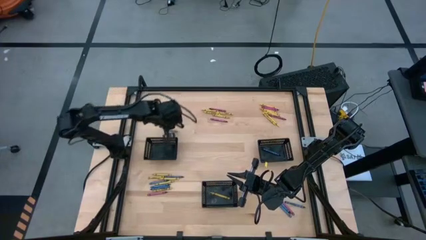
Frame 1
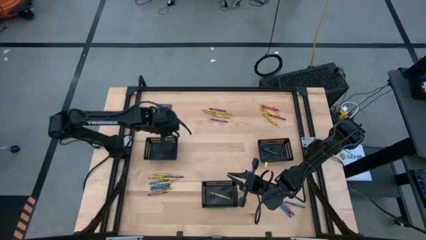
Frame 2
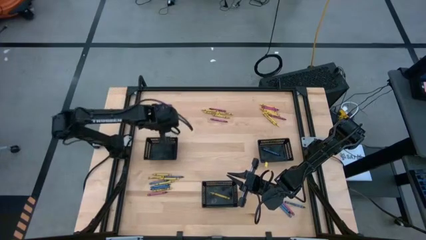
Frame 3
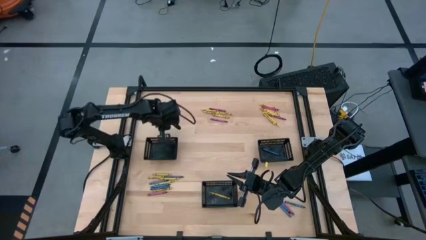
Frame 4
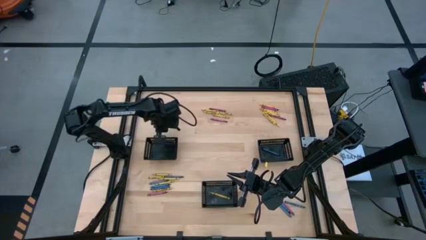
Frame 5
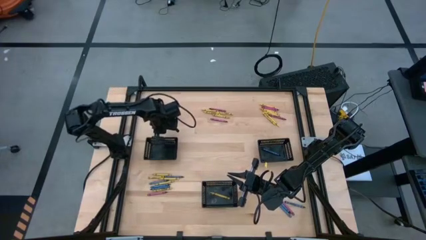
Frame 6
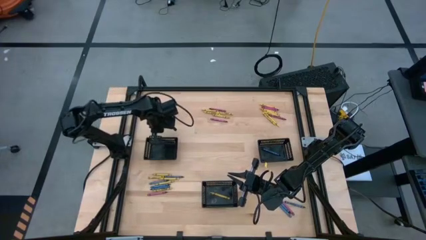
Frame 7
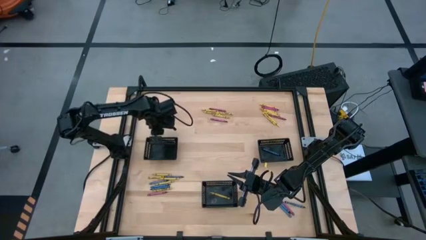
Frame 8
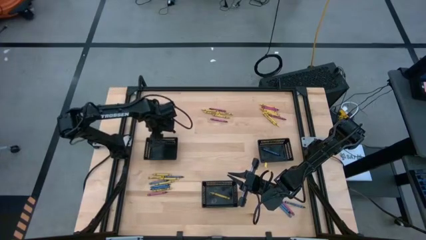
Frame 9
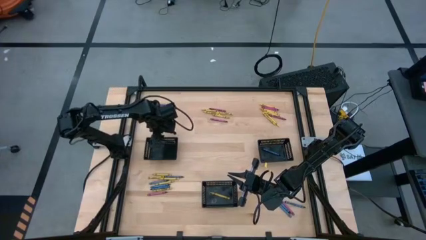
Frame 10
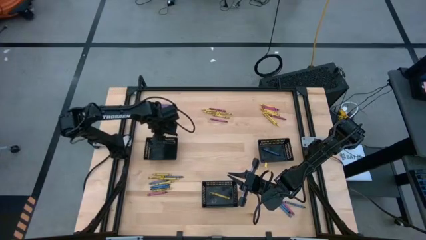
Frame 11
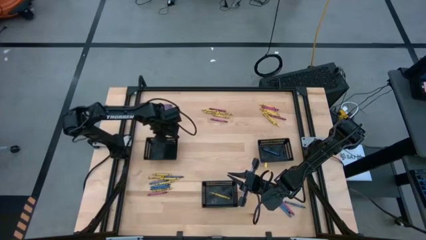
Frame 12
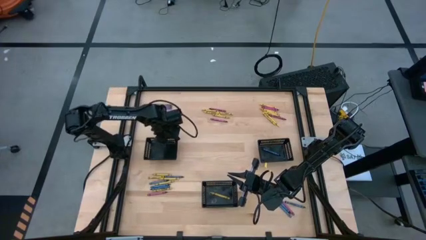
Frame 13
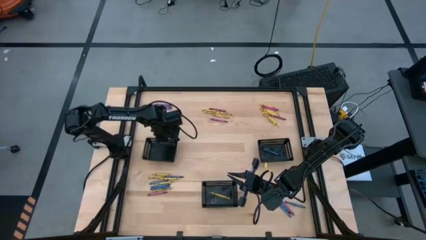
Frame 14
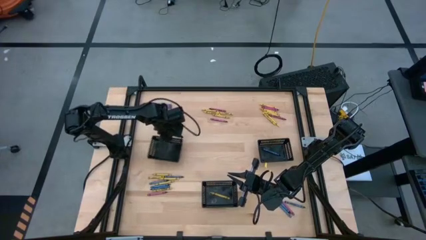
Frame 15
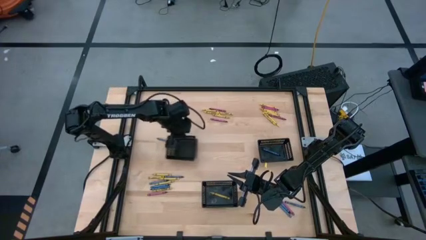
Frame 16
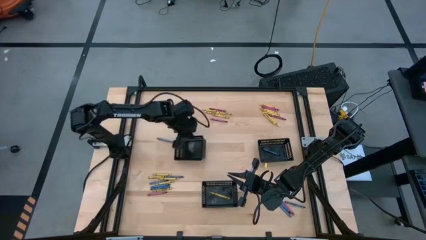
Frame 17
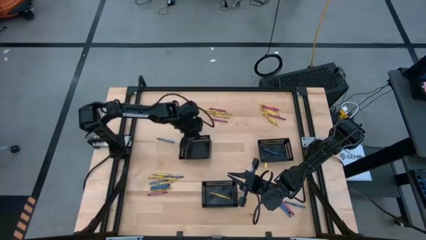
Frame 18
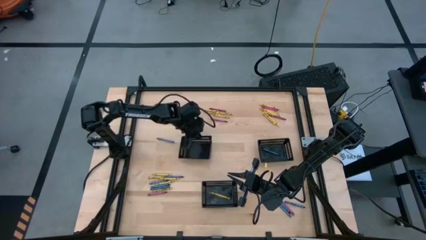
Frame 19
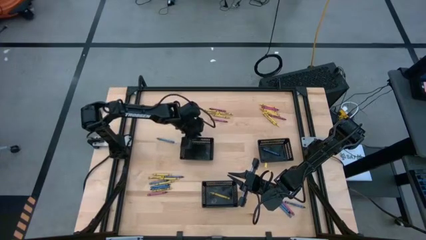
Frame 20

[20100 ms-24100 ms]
Task: Sort crayons
Adjust the left black bin

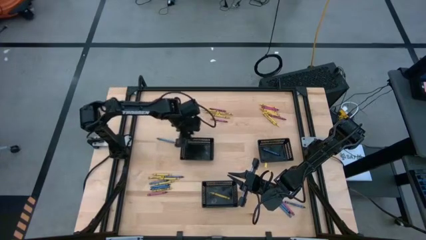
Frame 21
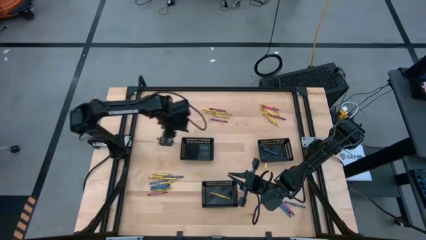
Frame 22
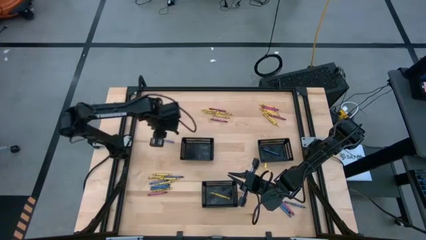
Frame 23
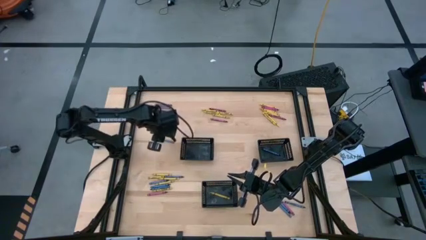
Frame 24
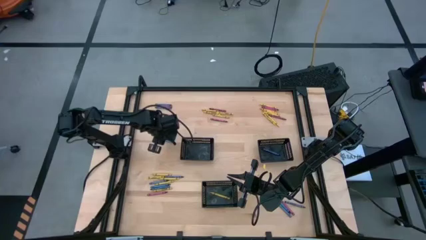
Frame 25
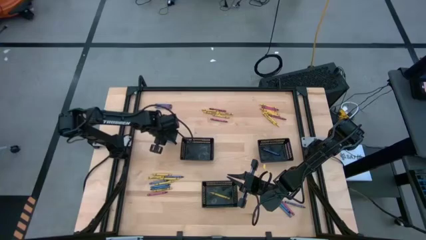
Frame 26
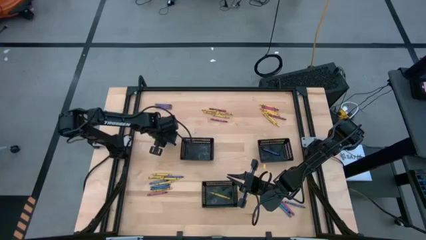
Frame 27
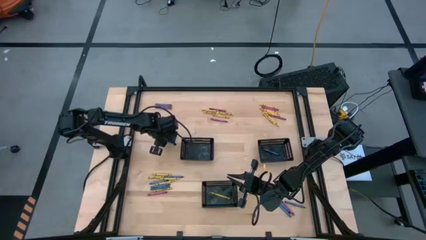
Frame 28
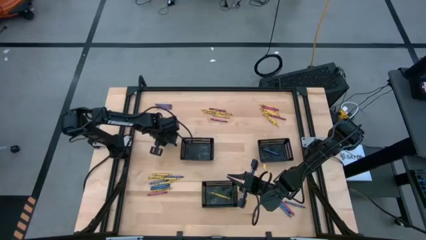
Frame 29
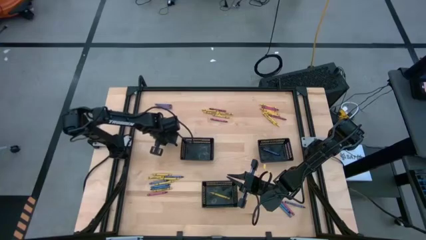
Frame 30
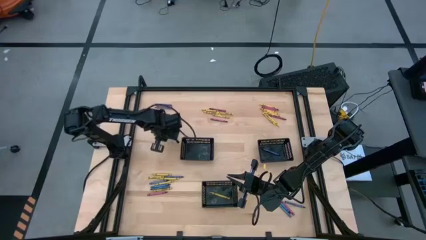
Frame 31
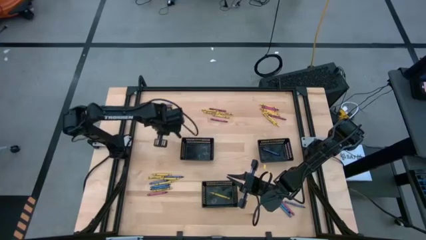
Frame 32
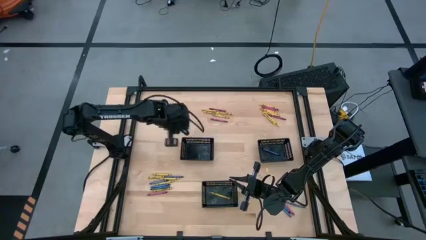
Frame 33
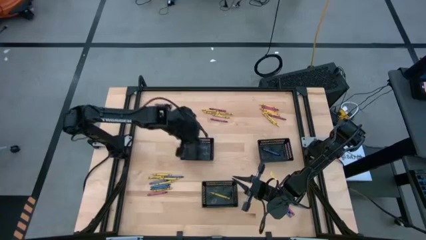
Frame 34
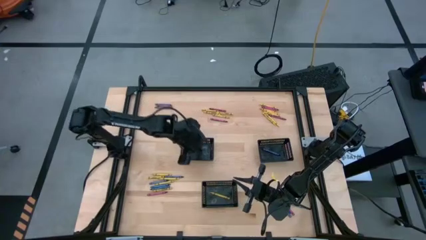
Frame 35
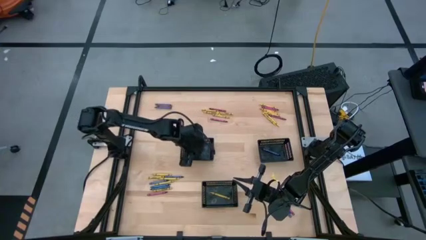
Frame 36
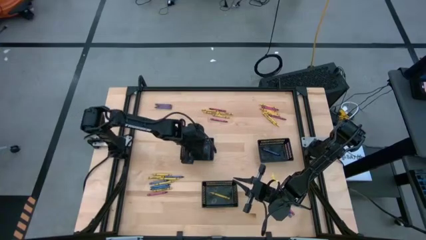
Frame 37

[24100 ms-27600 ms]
Put the blue crayon into the left black bin

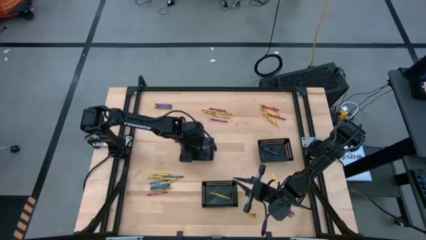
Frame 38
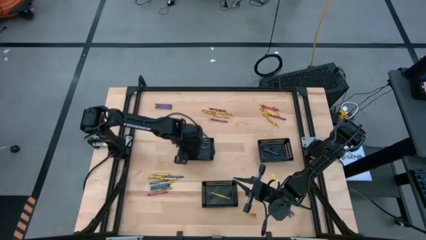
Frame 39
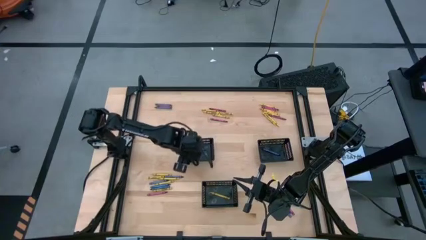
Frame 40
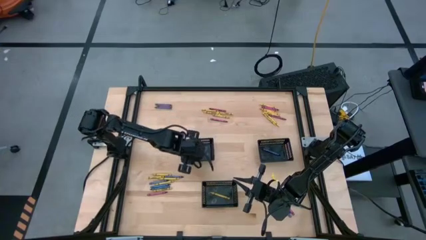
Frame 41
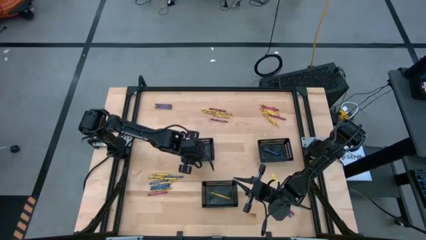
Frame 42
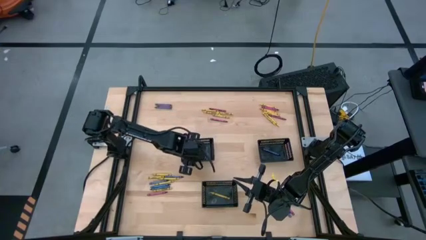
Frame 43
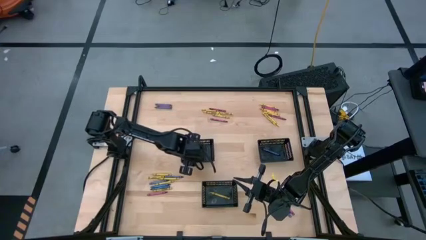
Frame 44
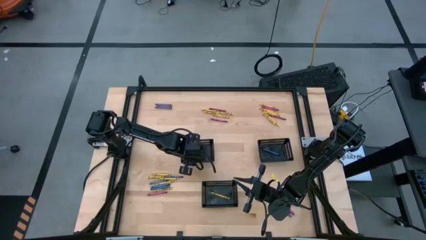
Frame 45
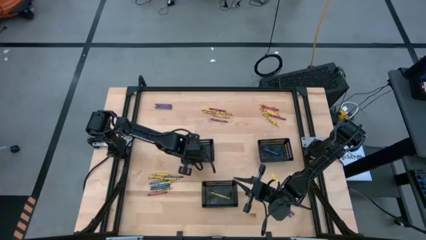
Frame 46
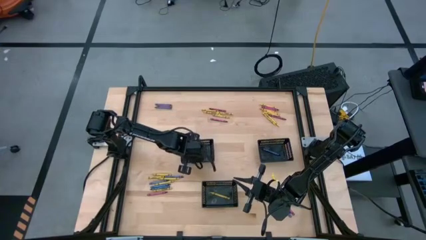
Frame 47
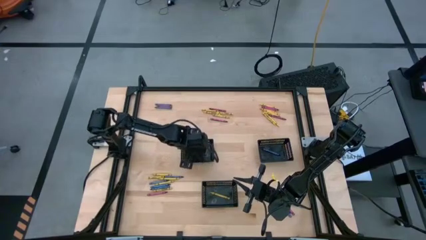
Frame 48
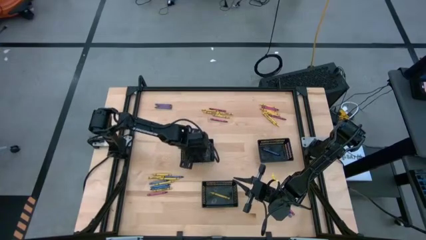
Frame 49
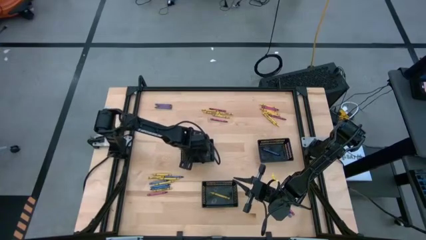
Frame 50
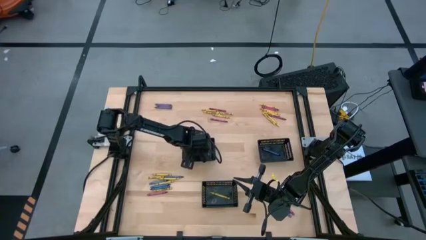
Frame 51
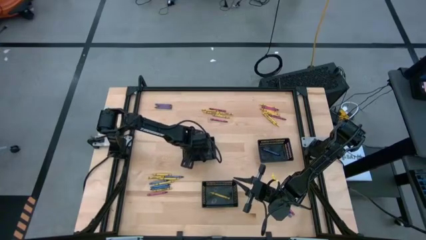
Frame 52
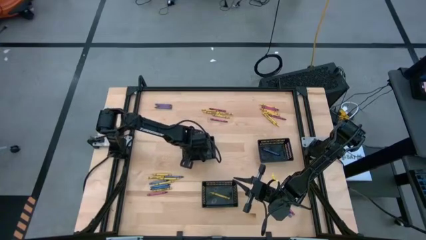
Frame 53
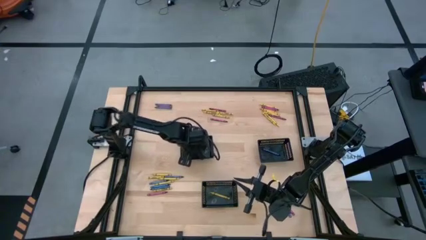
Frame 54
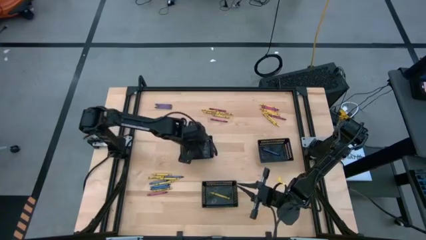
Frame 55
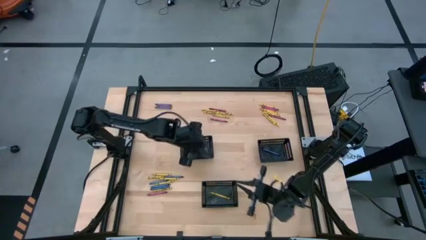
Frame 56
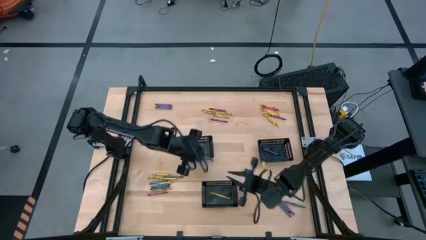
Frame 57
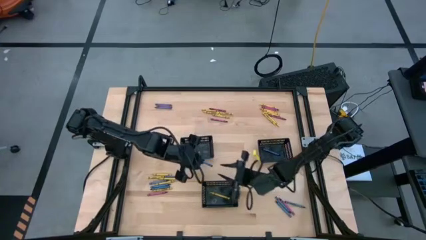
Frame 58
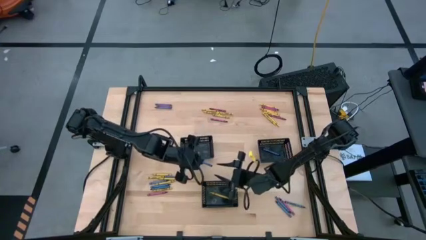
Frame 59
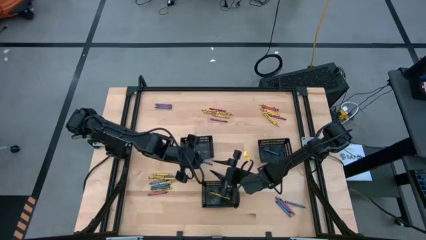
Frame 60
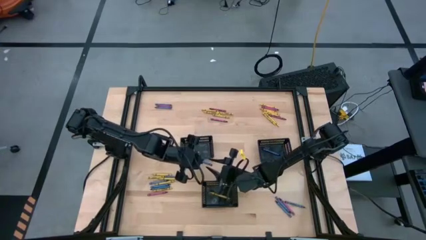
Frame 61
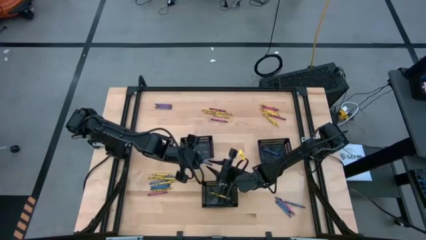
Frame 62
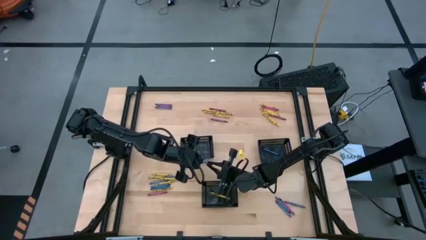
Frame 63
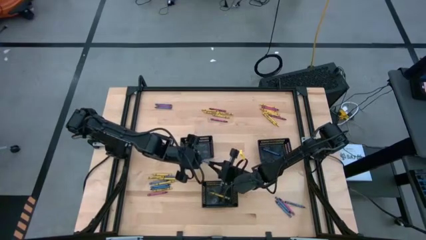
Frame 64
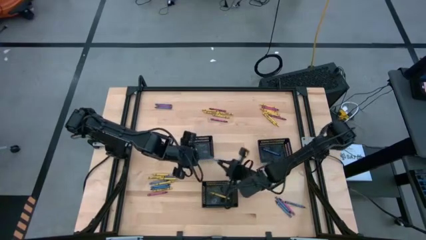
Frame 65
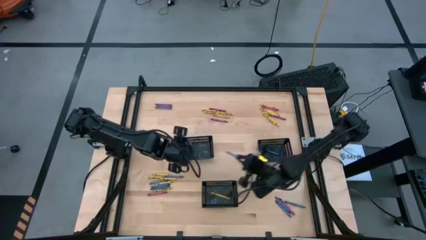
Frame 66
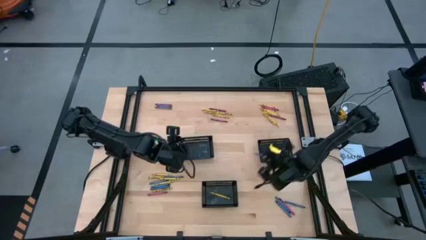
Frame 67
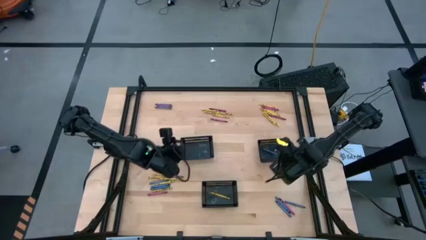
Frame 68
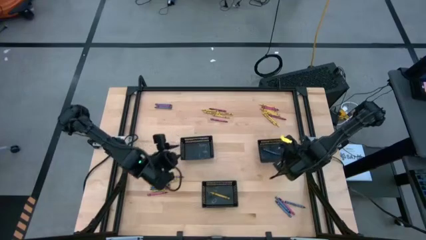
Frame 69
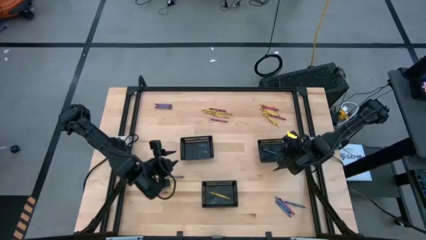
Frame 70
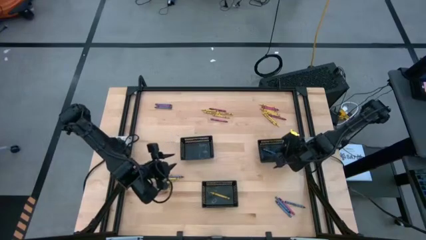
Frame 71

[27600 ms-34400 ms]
Put the blue crayon into the right black bin from the left black bin

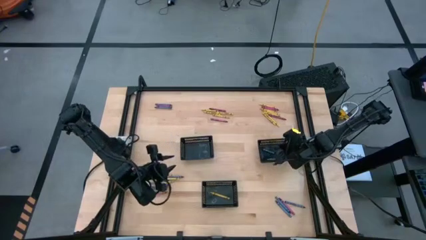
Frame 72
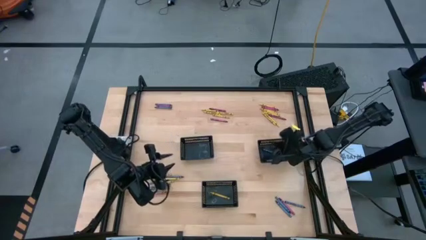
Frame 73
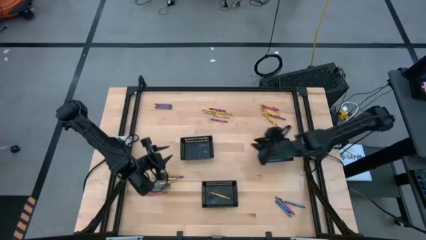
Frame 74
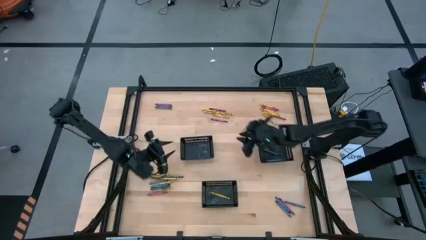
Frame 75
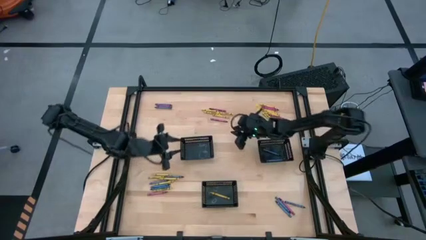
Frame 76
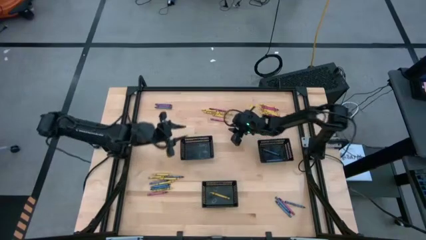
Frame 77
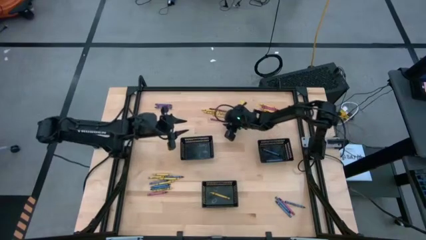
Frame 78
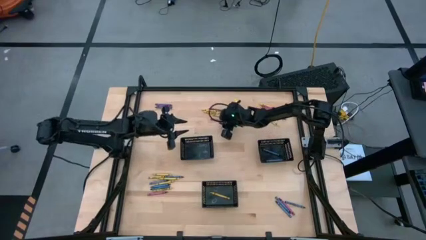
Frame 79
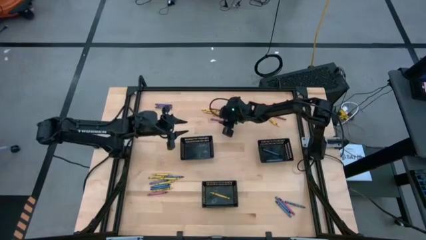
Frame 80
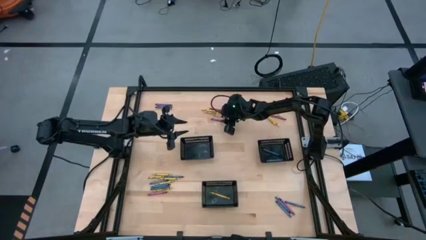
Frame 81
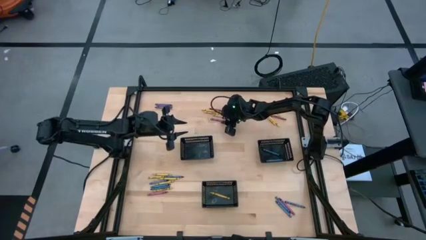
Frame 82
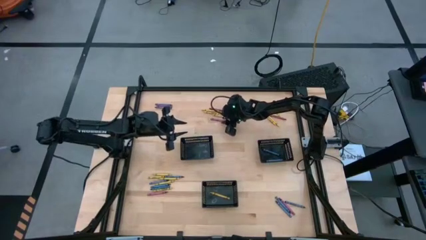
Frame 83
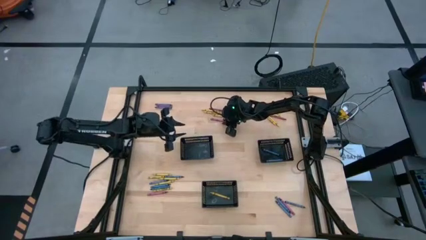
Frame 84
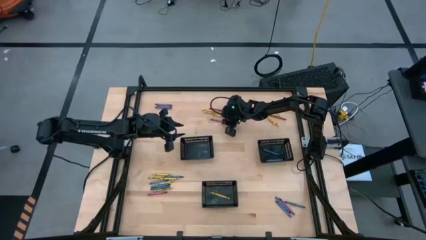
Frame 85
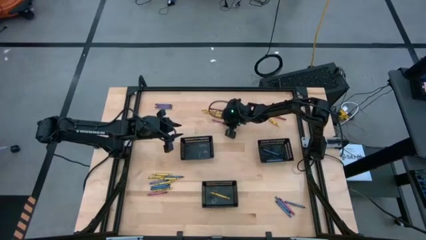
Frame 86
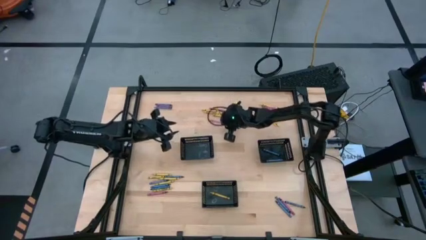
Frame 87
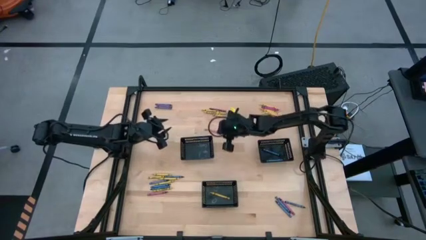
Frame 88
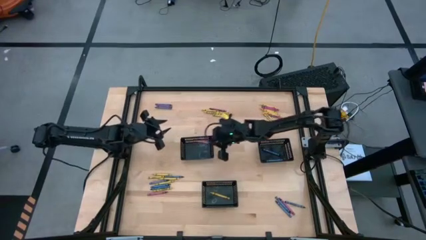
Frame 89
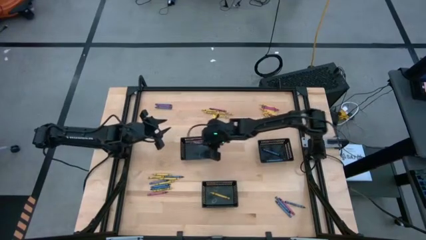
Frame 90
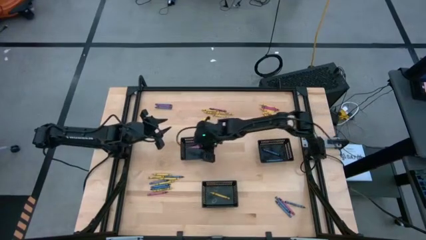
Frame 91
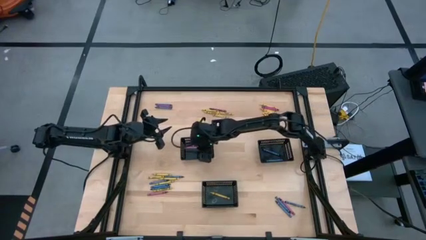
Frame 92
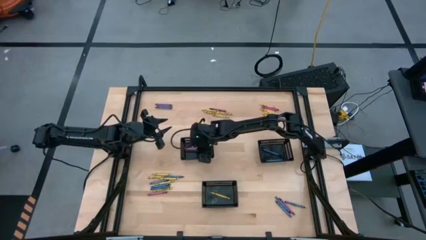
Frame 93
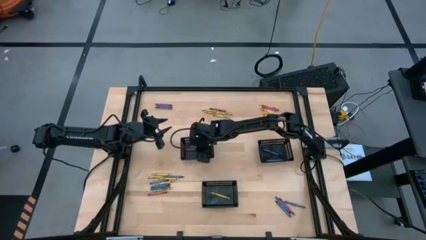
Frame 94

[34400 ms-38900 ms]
Put the red crayon into the left black bin
